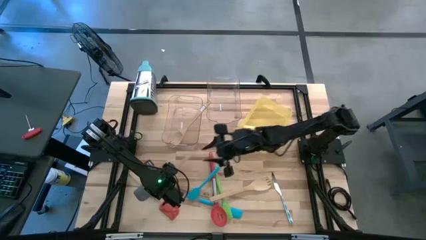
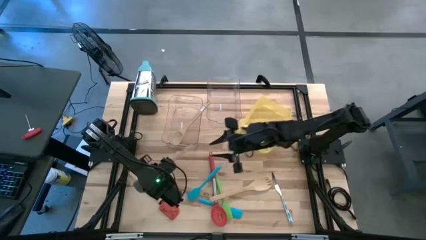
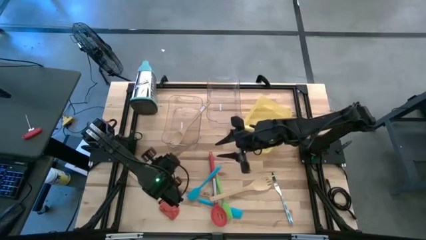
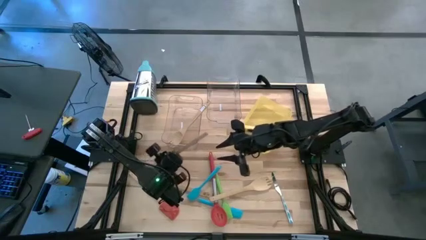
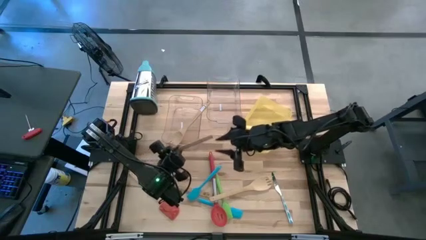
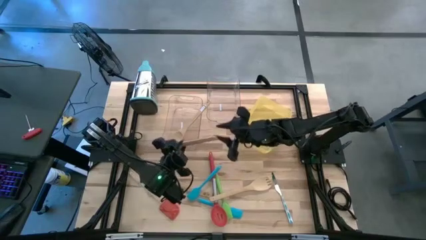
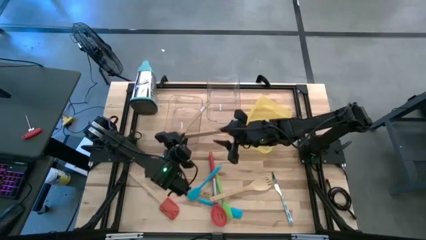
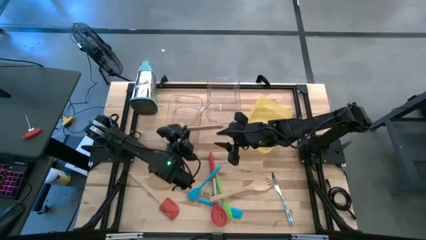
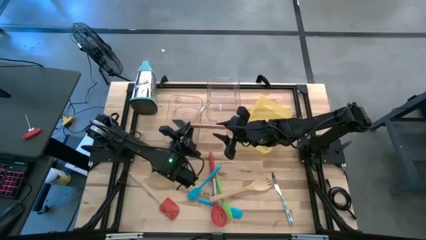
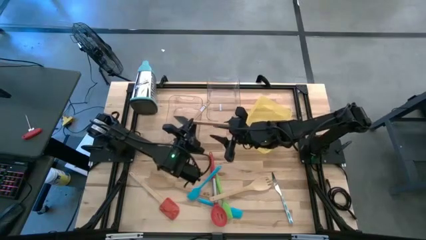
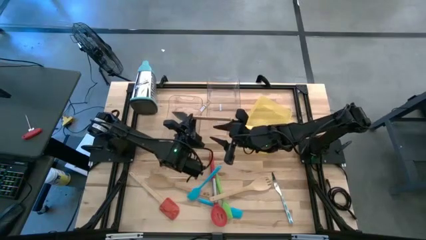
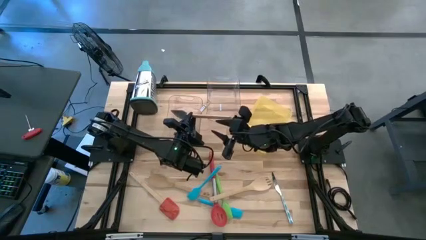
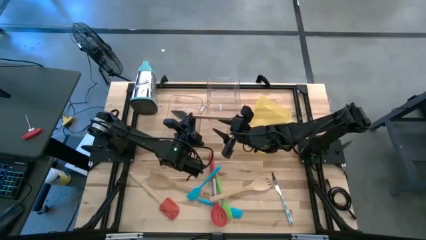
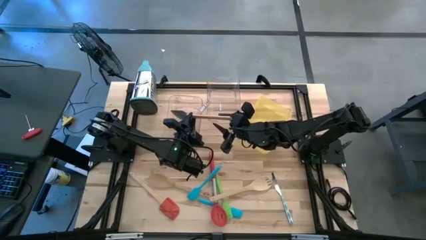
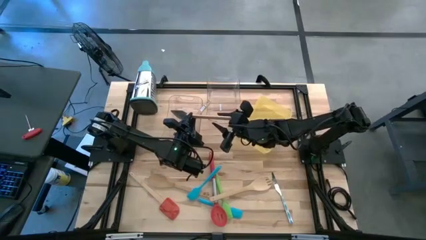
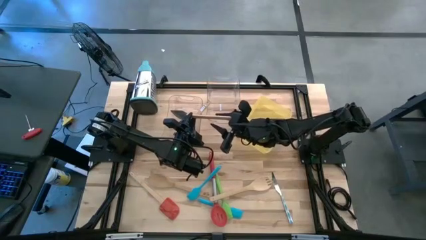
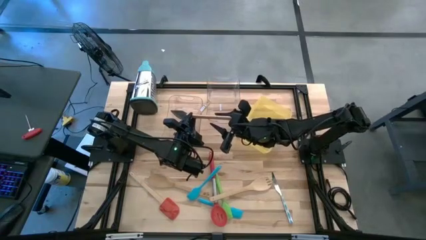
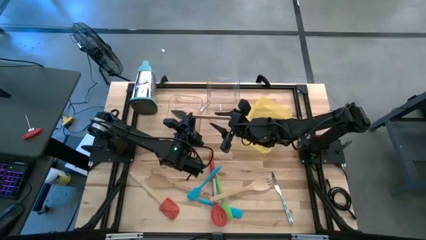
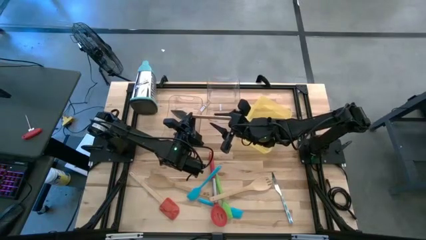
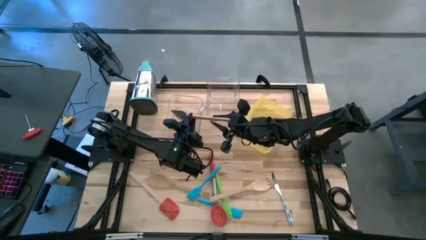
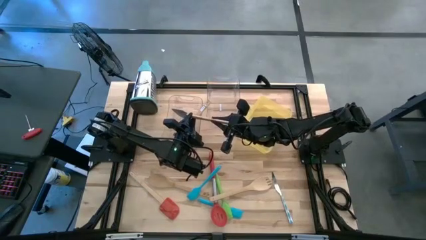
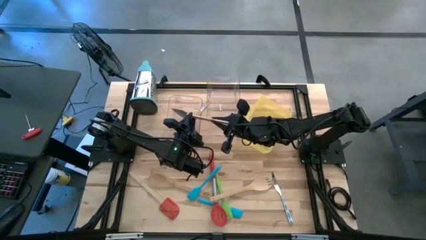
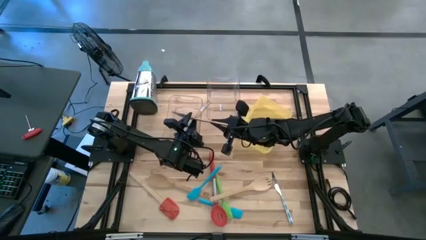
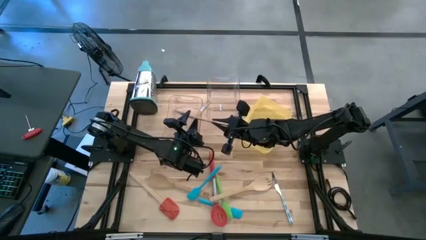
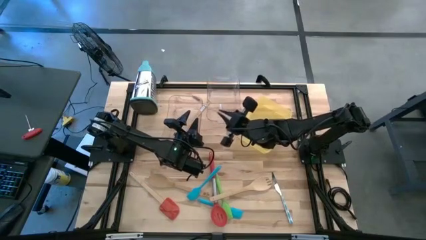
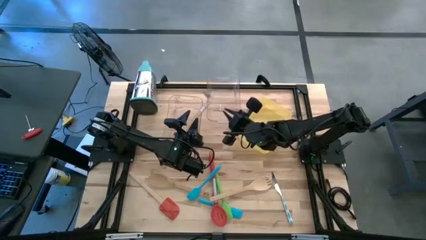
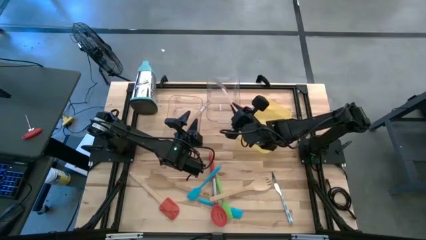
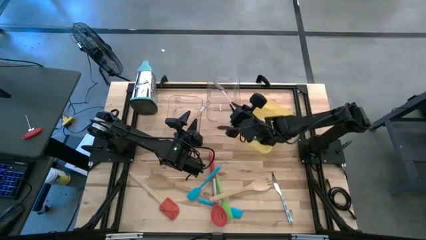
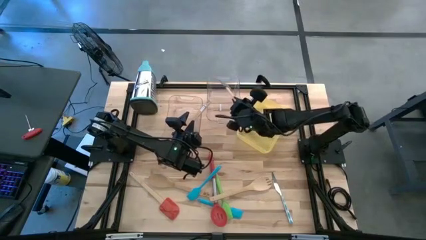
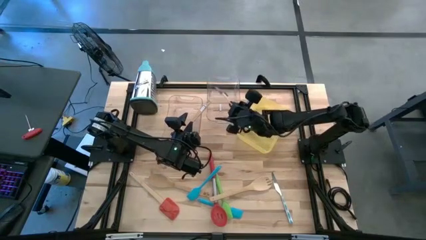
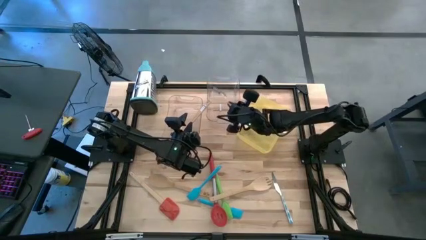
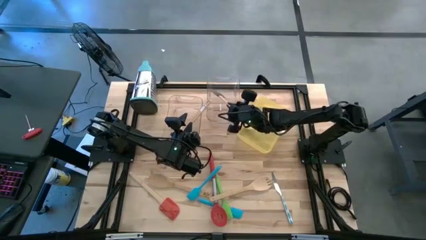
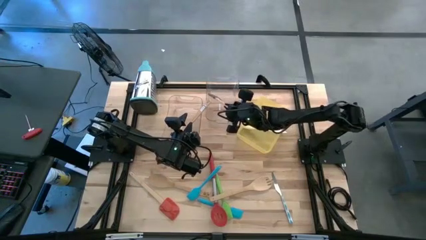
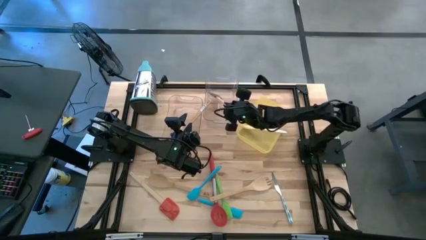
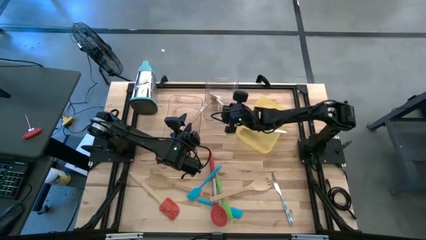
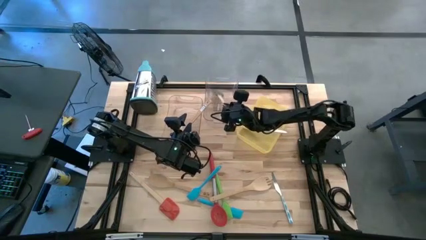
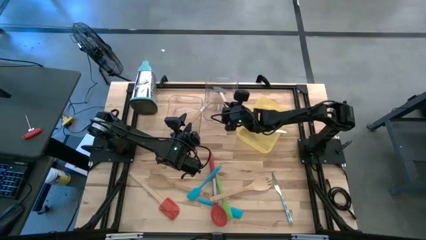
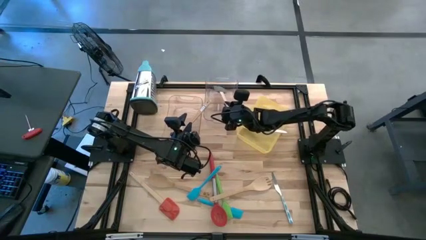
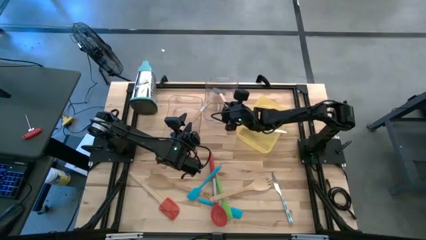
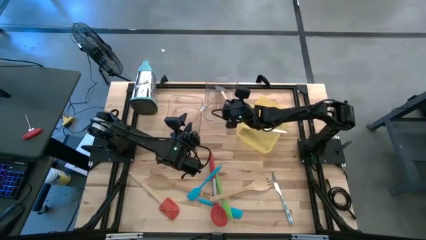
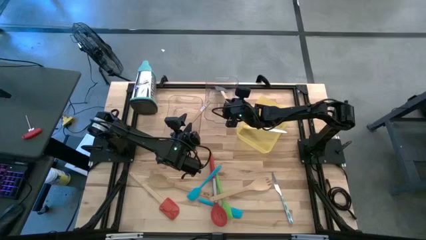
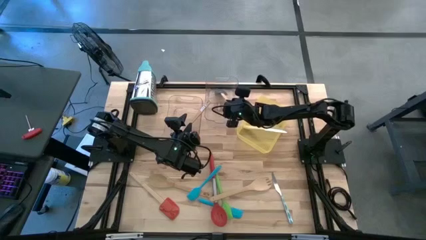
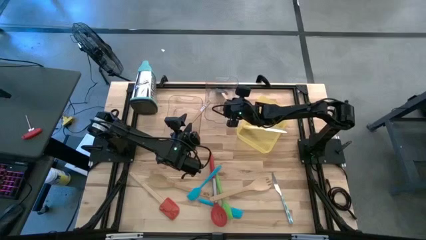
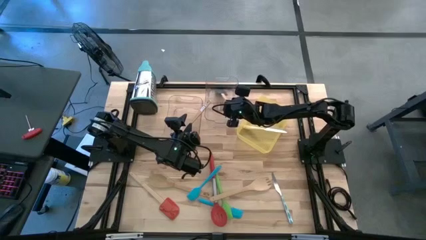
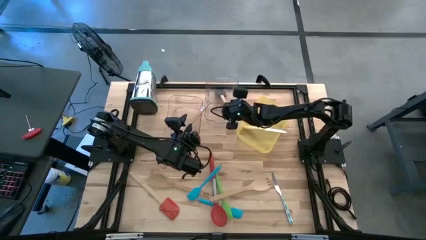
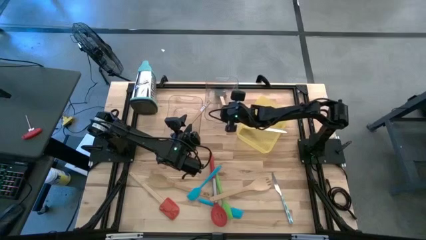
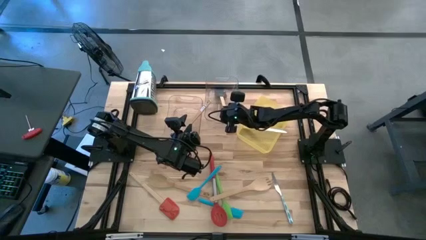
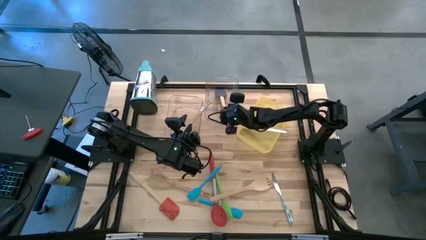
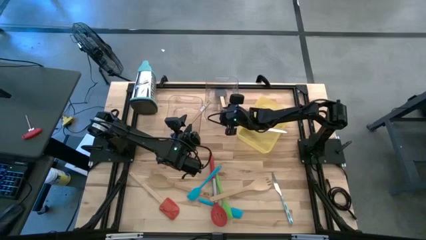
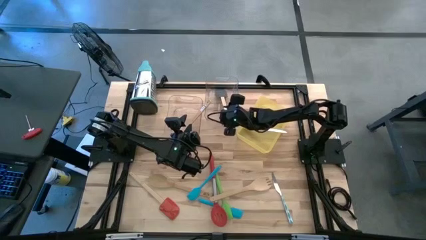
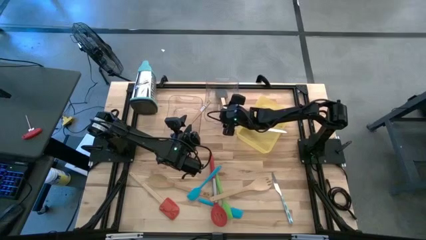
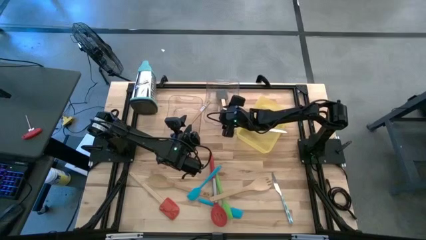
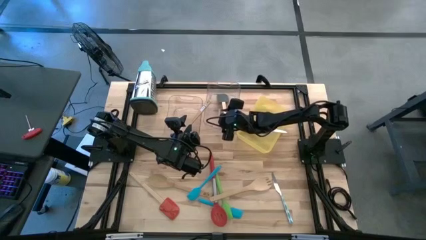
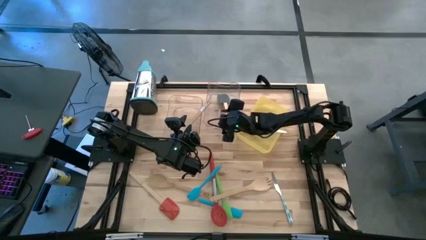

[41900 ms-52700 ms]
Task: Pick & Place Kitchen Items
Put the gray spatula into the right transparent bin

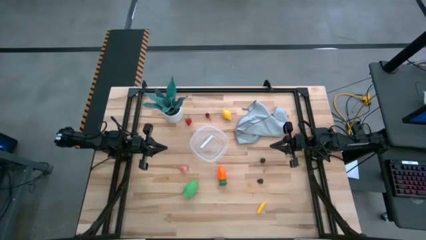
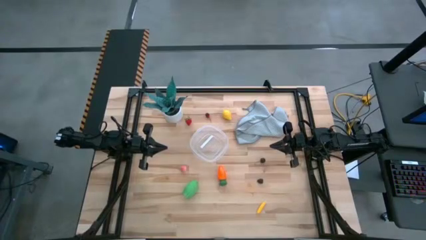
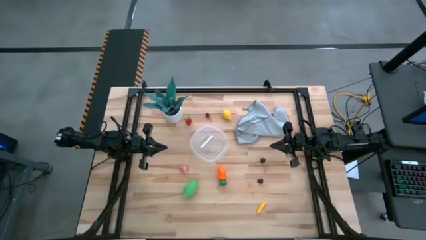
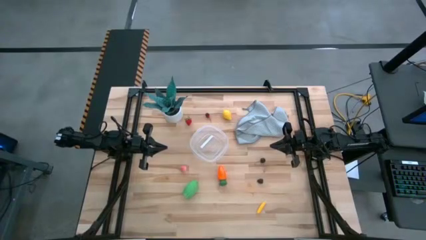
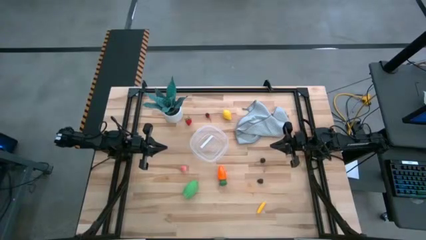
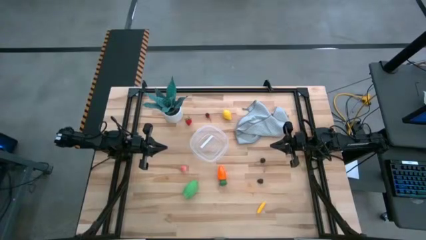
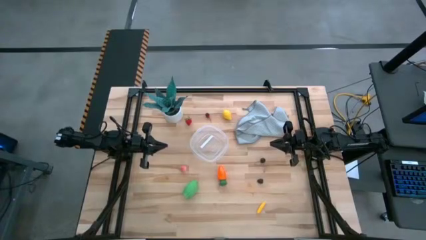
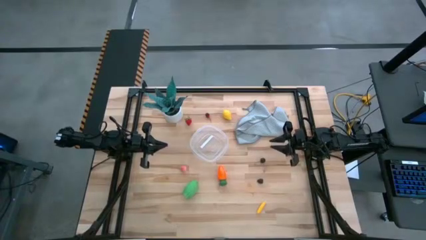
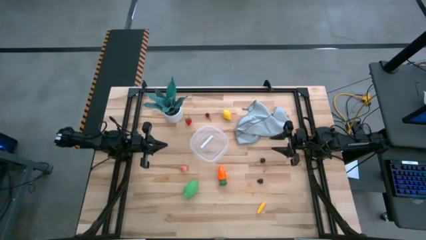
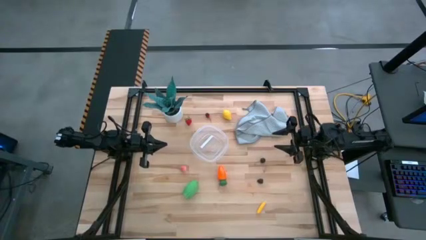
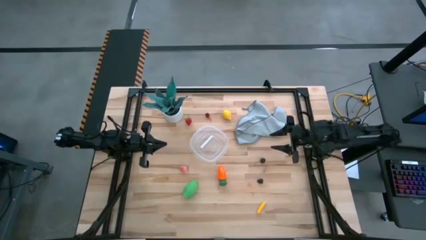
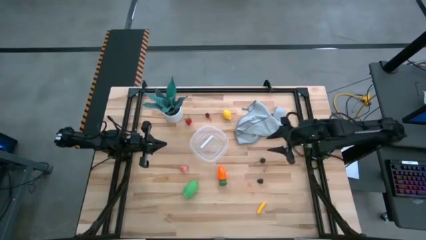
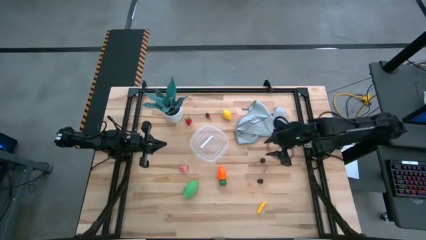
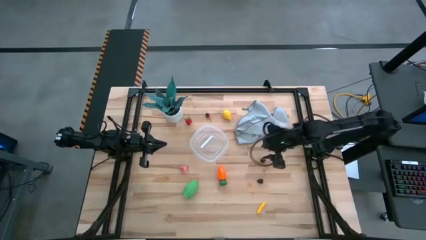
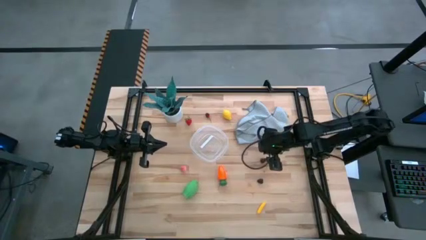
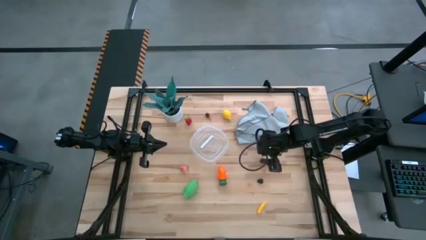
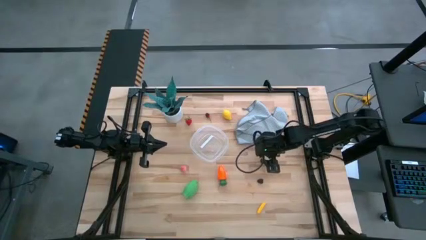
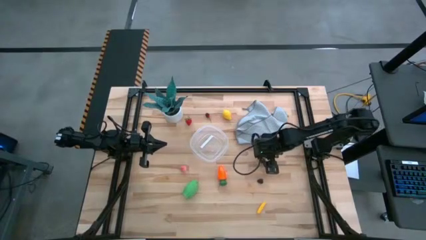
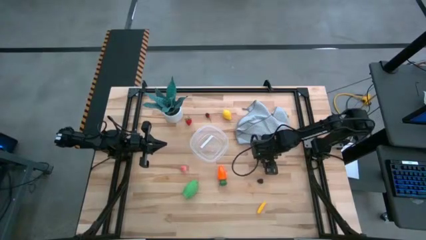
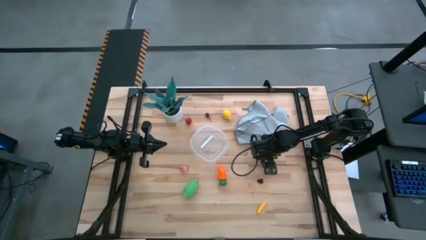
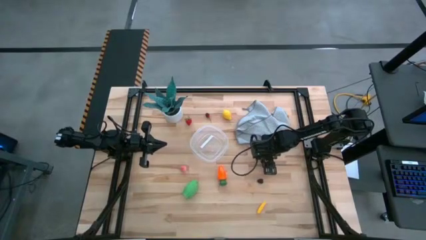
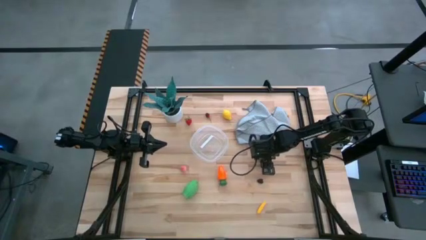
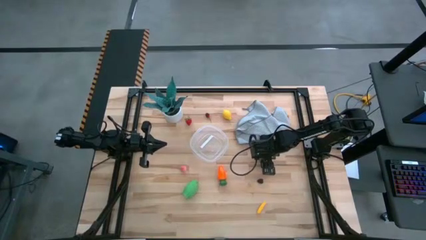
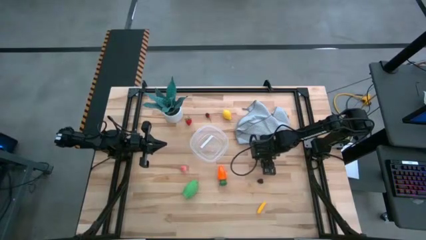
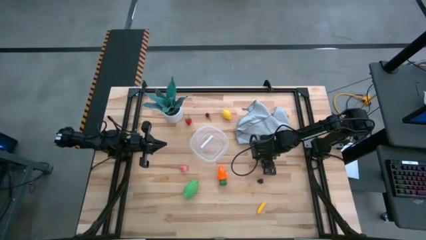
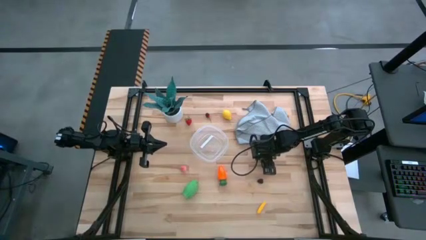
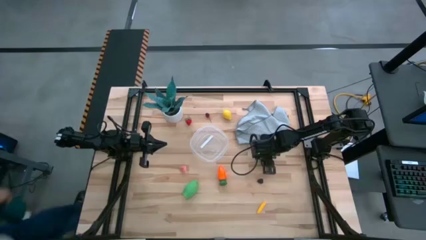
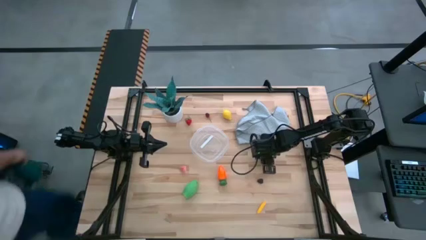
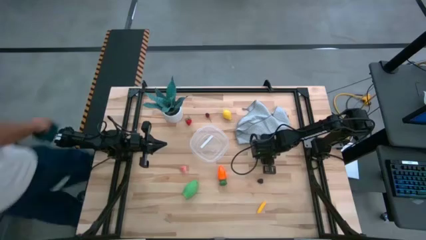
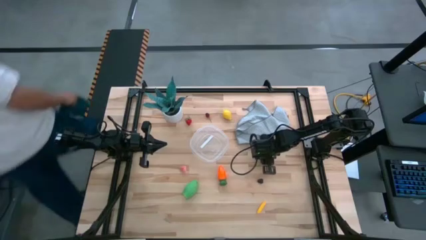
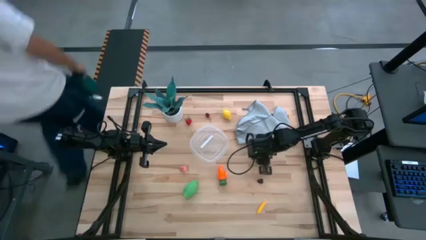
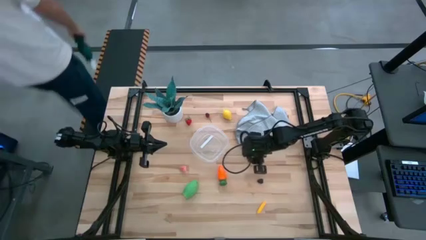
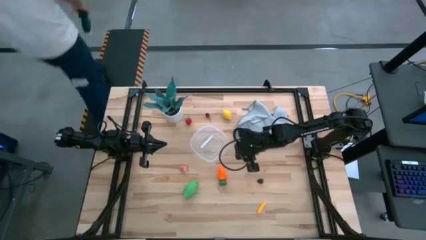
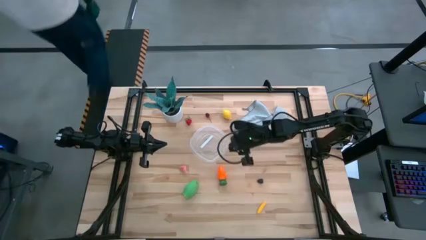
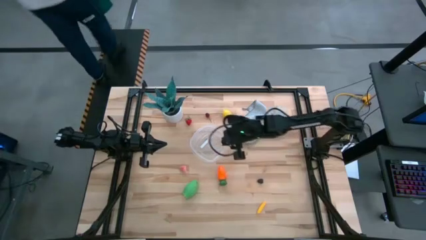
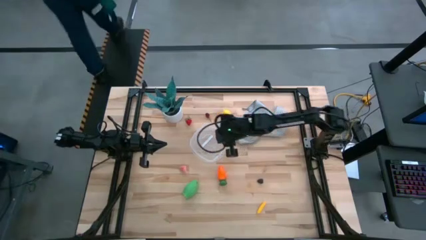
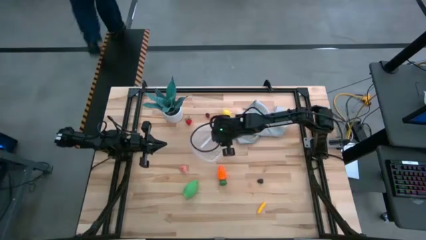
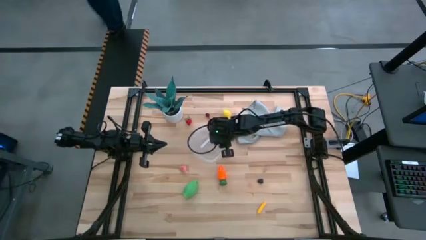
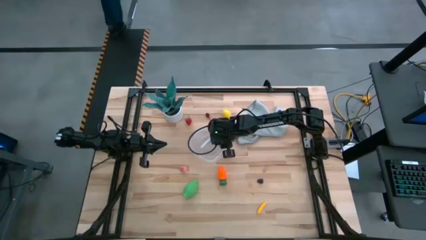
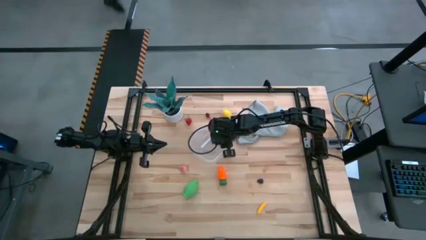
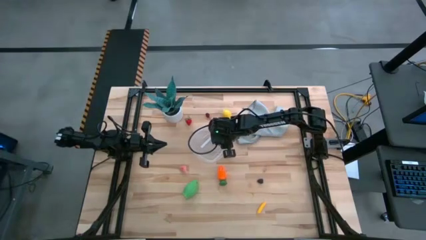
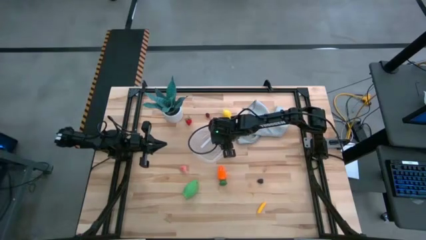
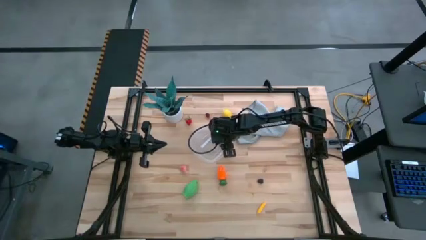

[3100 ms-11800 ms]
Task: Pick and placing Produce into tupperware
Put the black cherry into the transparent bin
